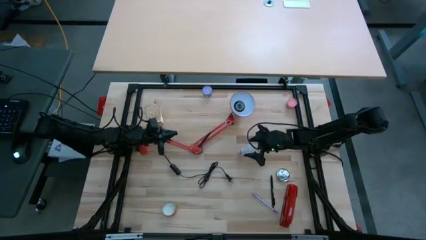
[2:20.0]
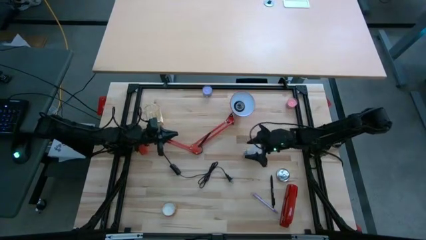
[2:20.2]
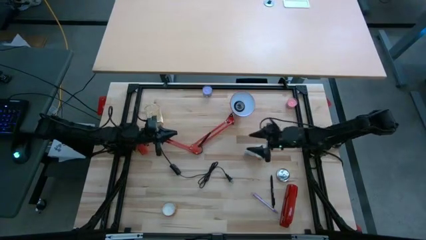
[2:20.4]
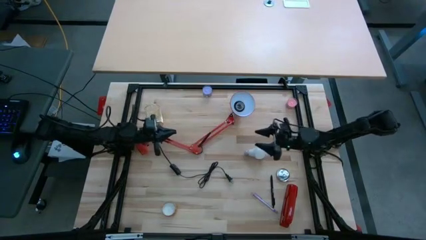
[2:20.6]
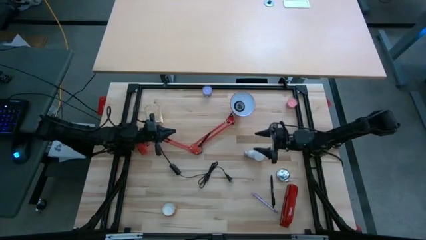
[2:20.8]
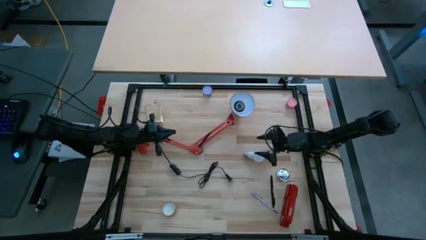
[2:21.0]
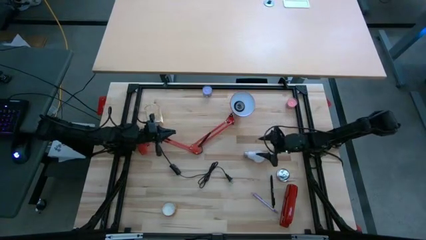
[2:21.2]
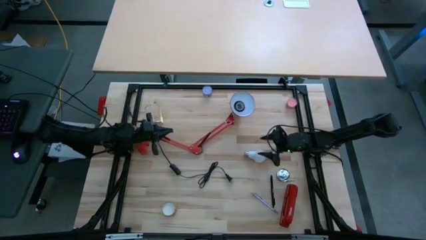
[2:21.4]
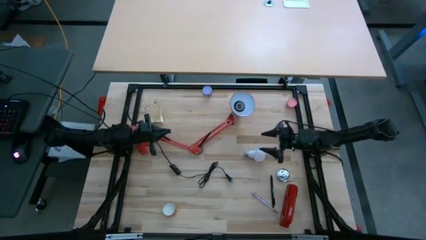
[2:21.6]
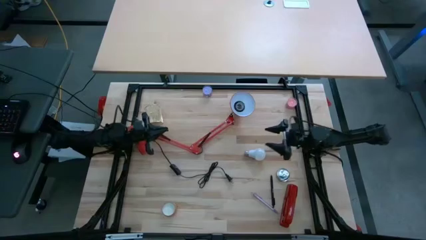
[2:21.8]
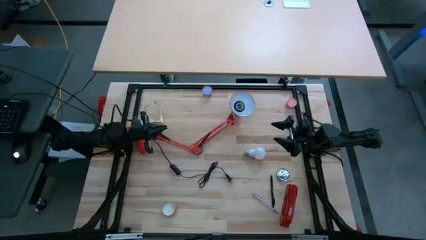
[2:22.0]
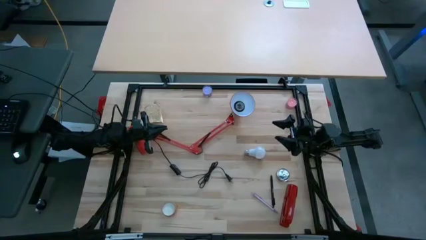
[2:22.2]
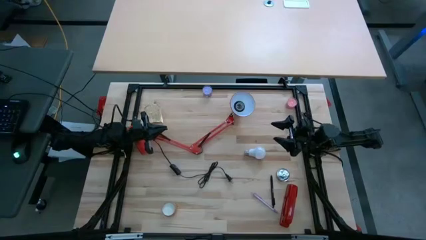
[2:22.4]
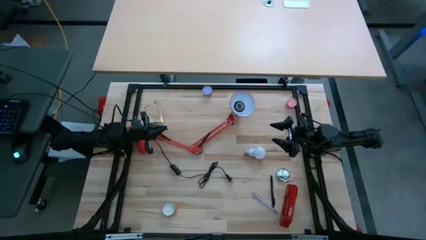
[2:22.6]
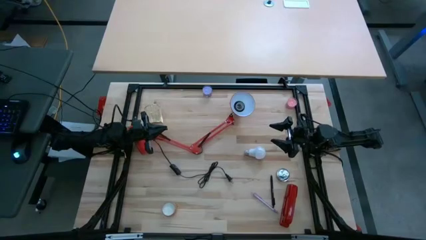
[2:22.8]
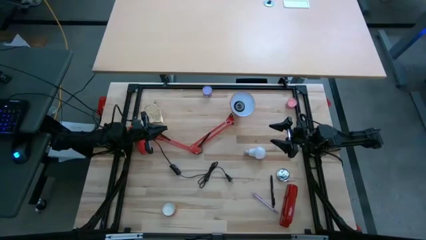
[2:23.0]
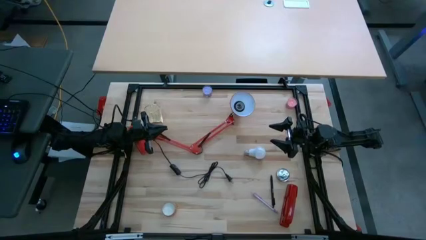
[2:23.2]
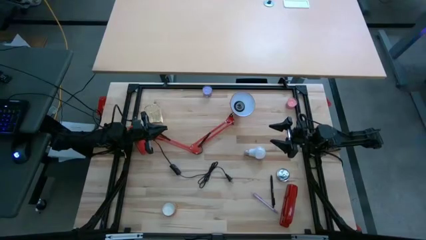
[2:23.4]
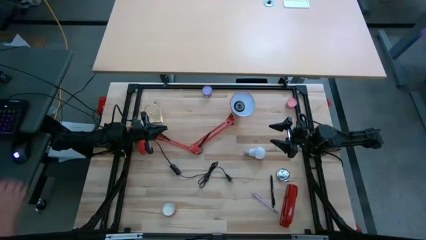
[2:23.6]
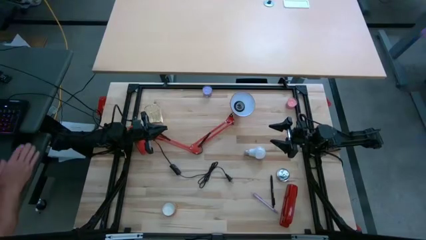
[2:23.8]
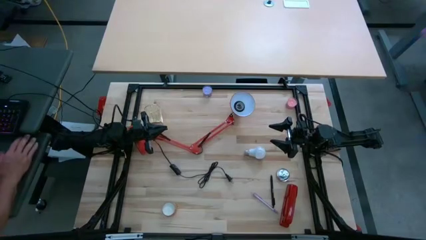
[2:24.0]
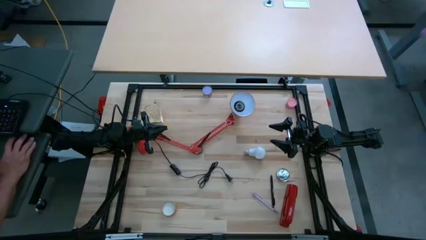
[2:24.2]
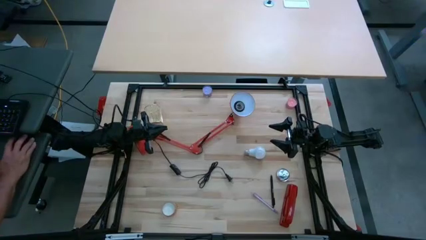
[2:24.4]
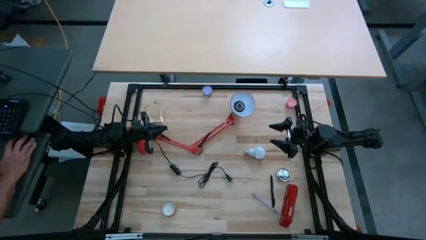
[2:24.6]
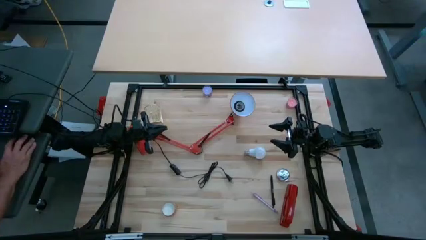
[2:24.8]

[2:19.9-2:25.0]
Task: Screw lightbulb
Return to Home Position

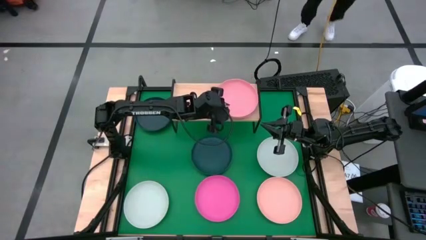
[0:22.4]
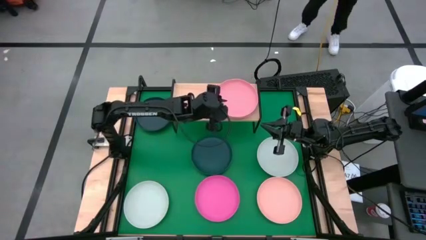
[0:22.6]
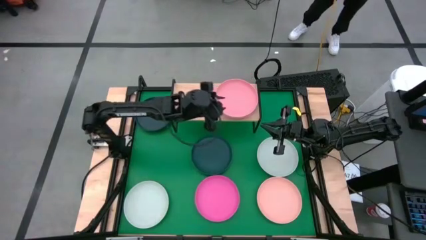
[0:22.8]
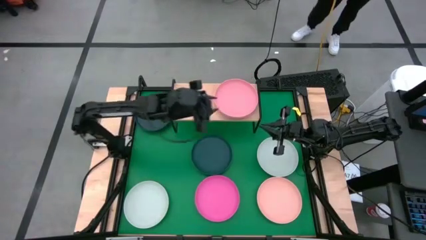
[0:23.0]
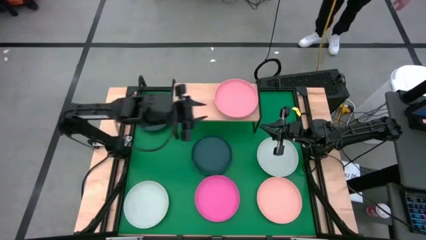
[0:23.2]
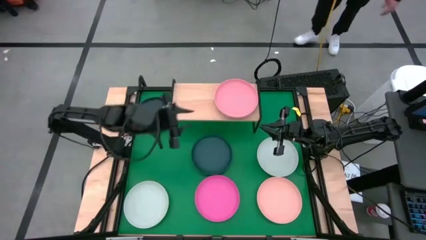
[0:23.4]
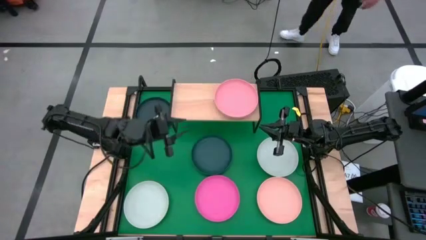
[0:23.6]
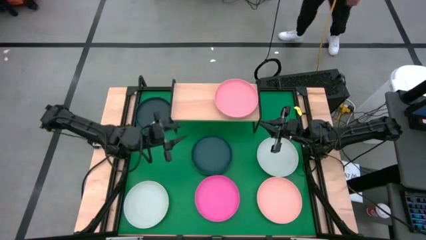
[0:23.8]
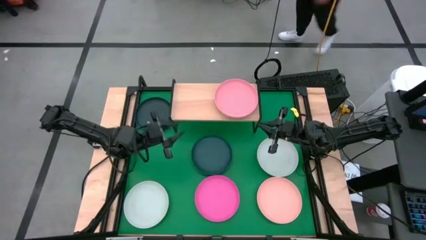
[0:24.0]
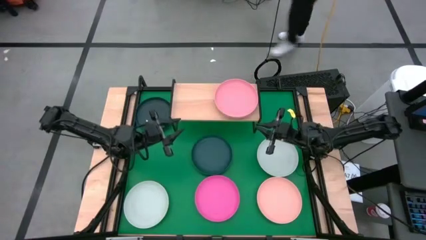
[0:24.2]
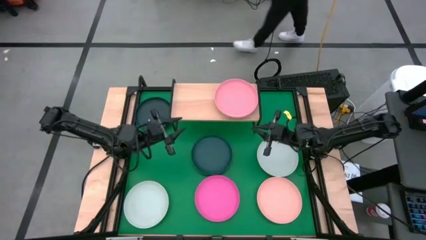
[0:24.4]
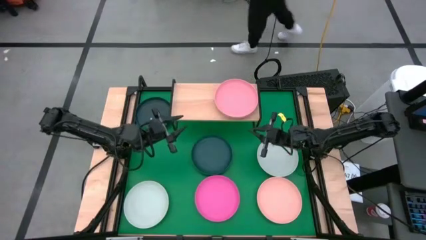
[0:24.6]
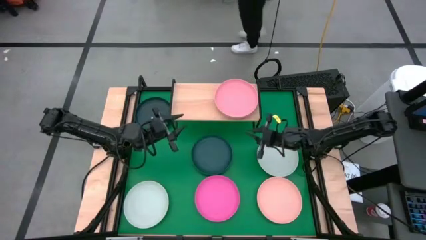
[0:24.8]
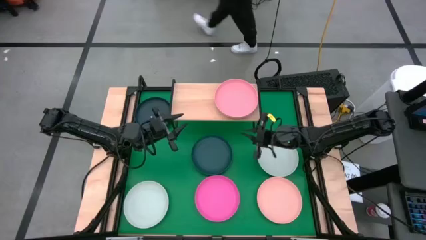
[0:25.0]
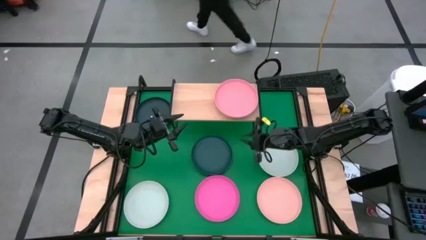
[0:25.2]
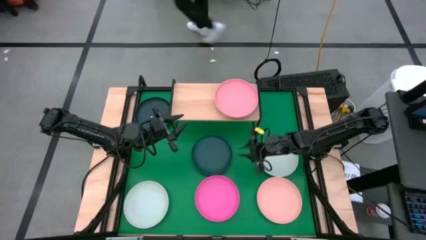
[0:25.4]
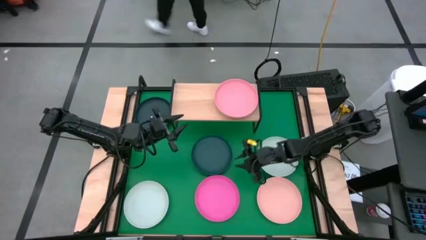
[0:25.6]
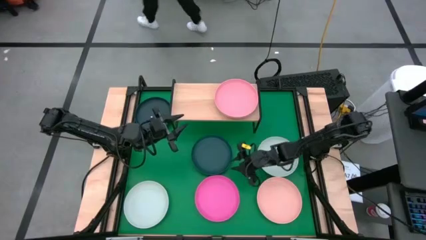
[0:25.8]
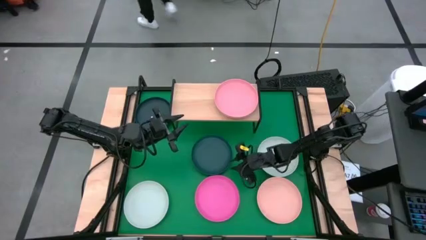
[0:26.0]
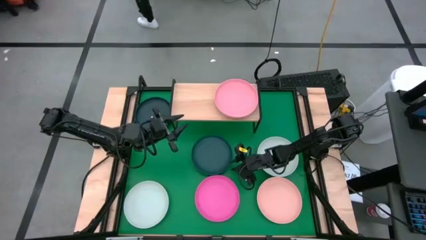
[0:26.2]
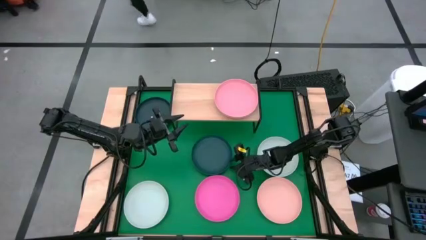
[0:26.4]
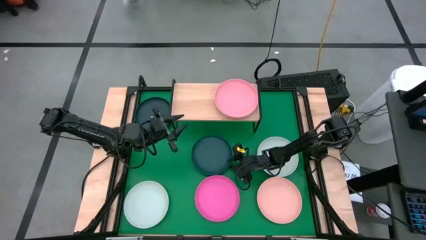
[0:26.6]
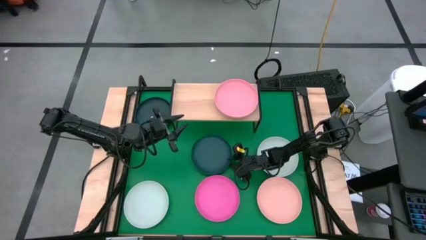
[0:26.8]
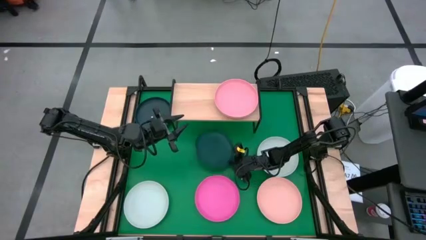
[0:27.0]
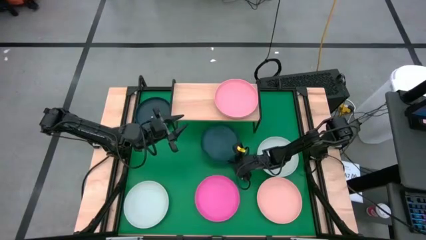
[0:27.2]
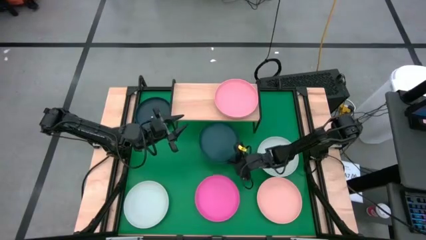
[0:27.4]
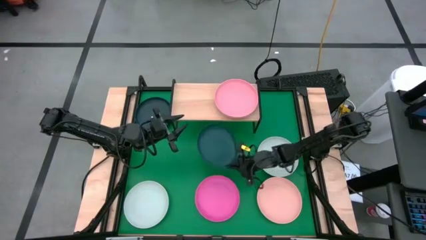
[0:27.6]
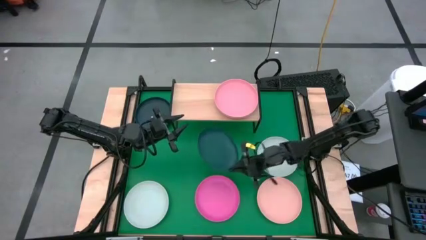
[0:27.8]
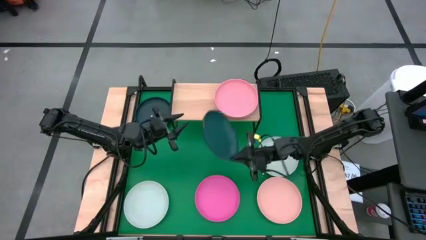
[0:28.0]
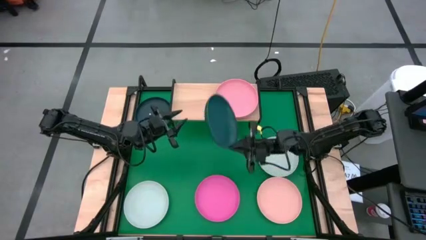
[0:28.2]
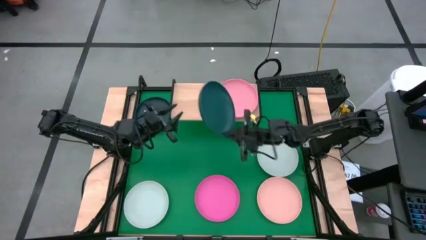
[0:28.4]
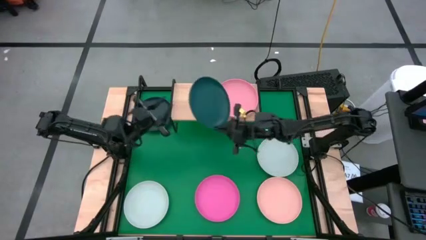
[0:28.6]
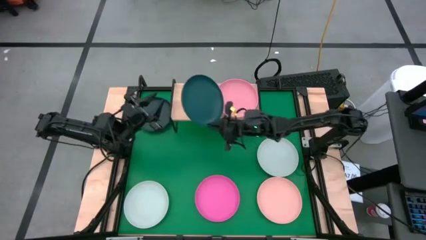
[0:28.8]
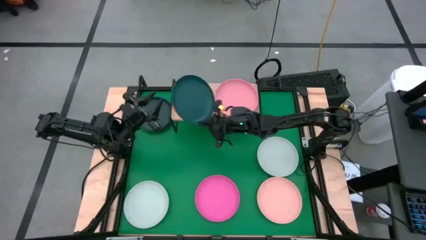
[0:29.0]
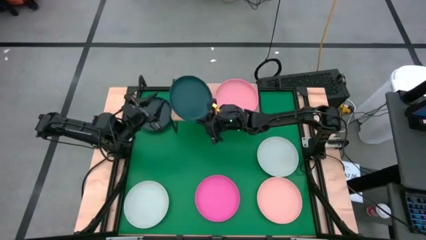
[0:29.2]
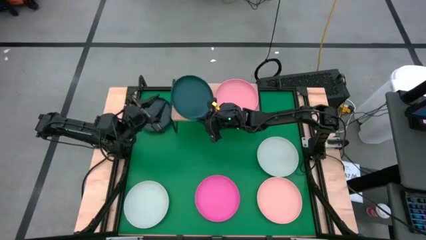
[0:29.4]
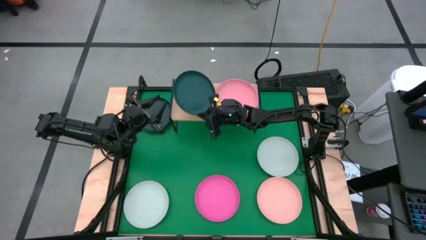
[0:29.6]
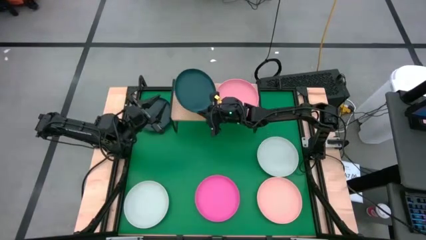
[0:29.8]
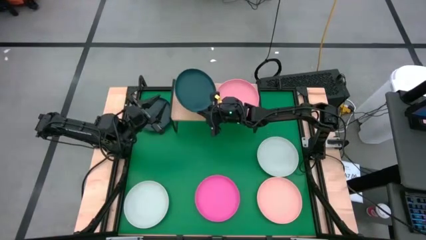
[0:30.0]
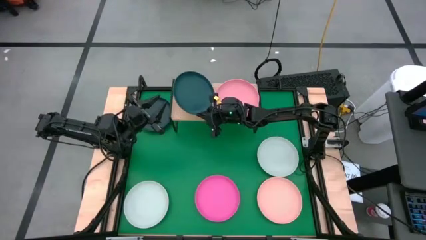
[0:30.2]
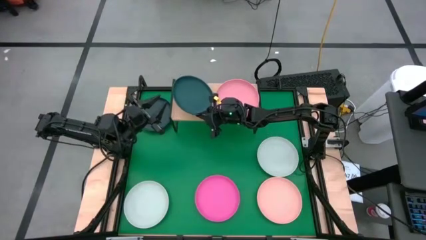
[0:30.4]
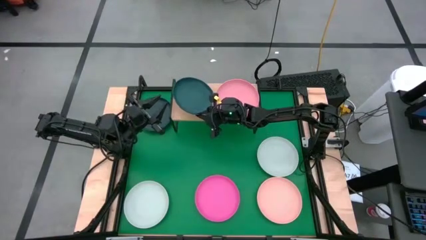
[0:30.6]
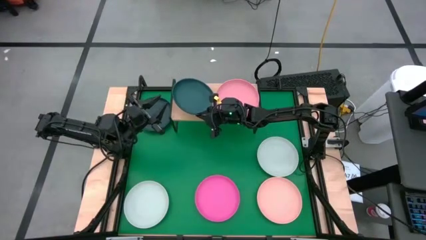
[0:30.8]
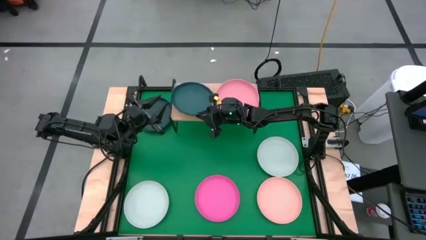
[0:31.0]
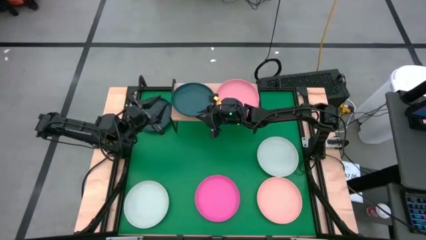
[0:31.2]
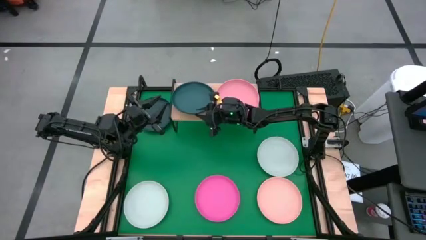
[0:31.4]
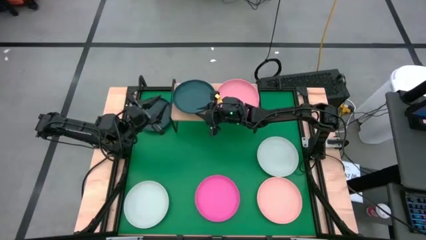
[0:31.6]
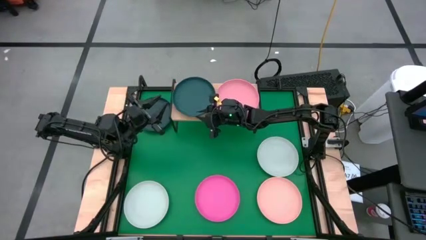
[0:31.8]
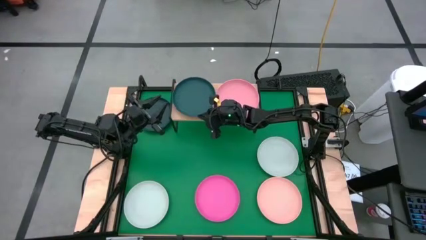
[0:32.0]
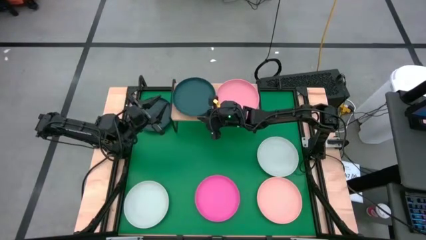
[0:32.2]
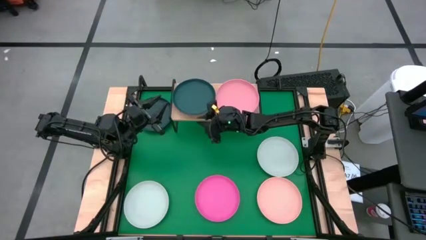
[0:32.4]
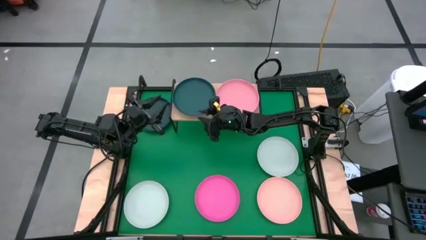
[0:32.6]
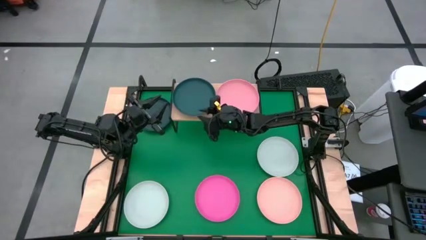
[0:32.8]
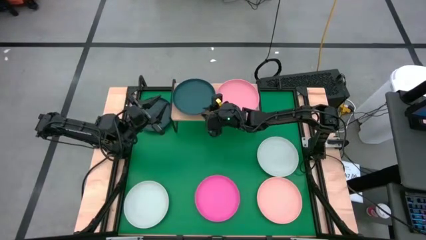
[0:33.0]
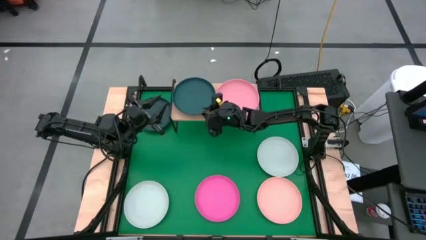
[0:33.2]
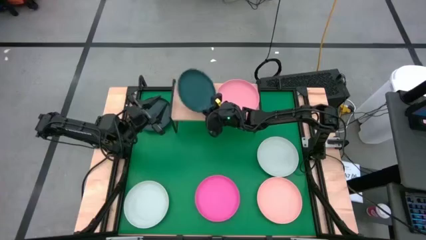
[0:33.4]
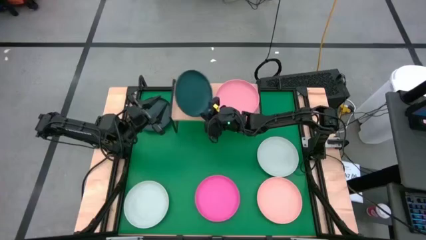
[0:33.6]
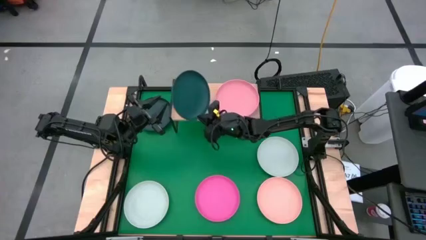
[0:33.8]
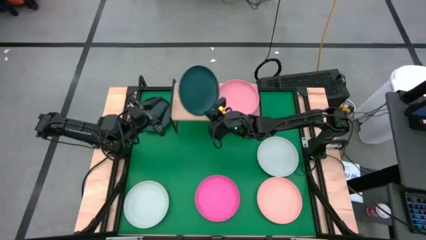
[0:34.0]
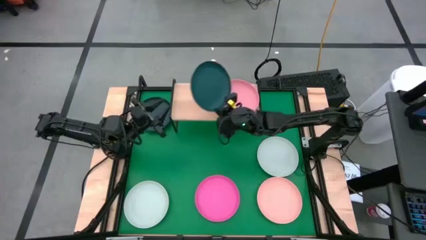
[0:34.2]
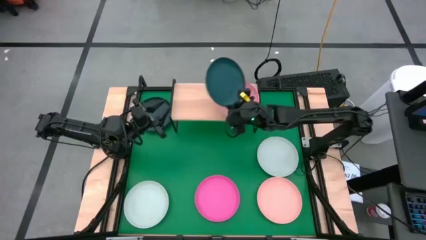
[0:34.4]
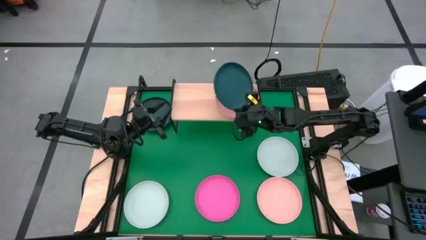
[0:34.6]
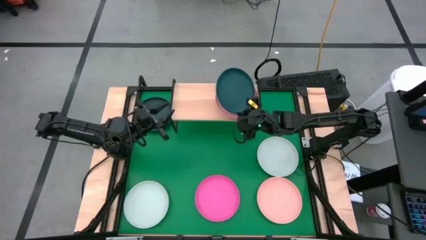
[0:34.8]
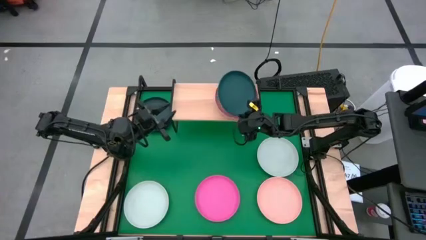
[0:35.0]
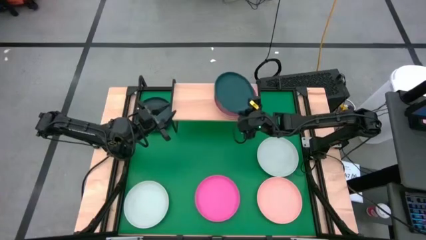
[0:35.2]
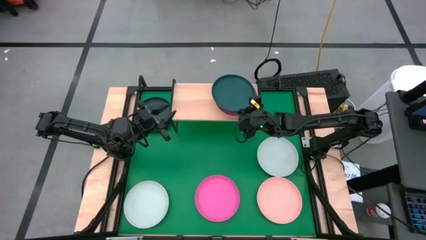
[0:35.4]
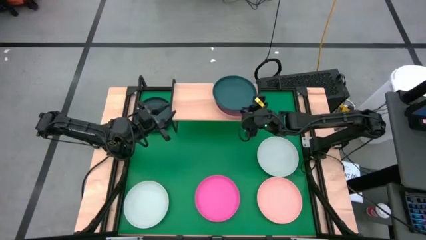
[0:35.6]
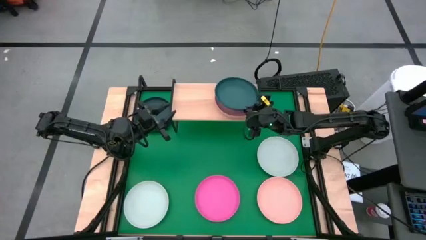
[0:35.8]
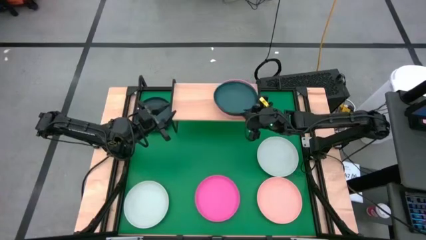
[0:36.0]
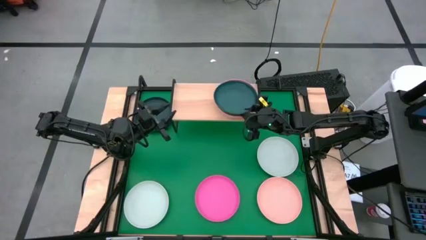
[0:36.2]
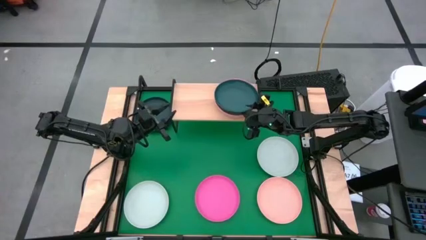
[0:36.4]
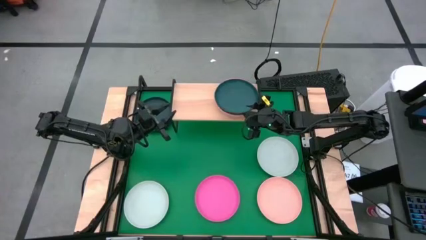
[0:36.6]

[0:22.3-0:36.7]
Task: Place and stack plates onto a shelf
Stack the right dark blue plate on top of the light pink on the shelf
